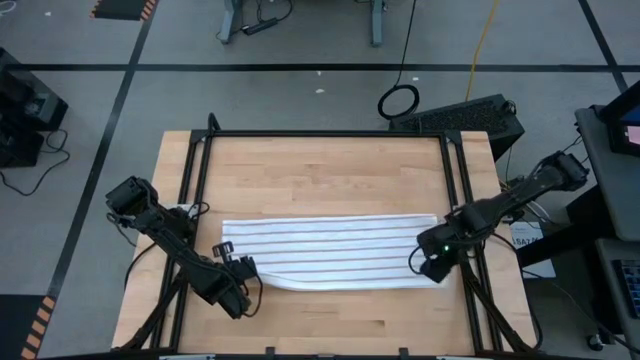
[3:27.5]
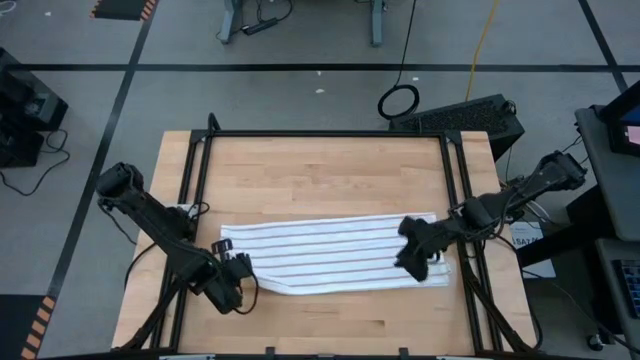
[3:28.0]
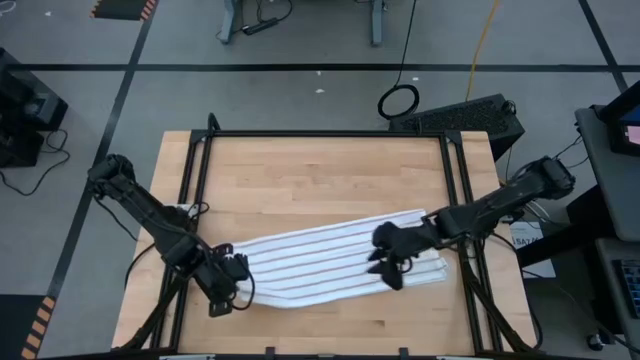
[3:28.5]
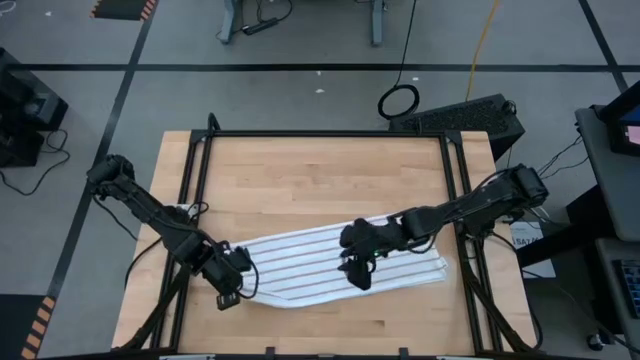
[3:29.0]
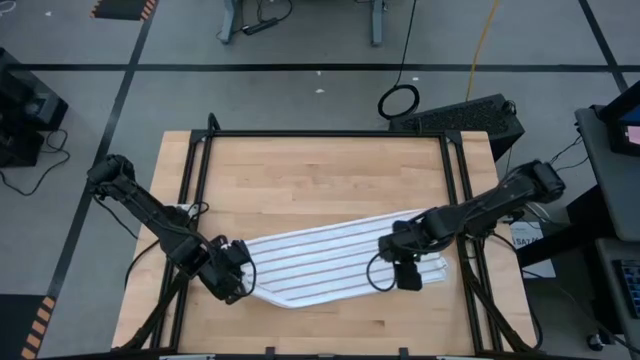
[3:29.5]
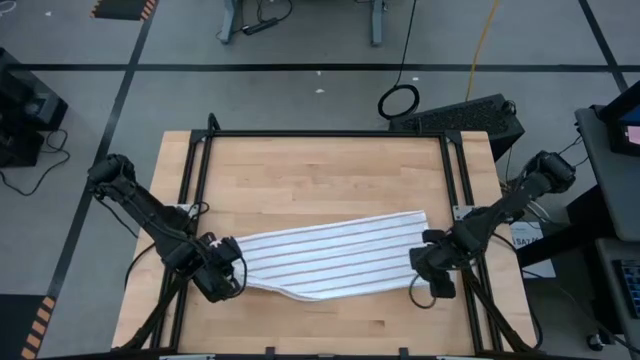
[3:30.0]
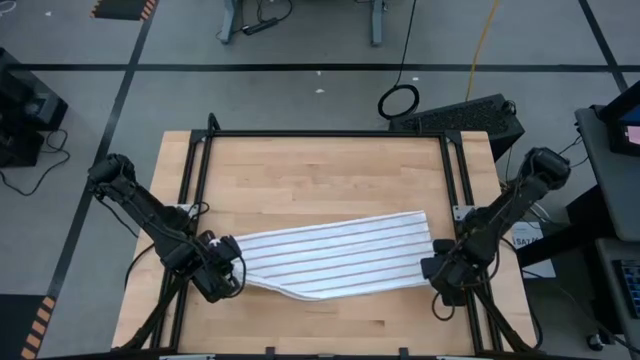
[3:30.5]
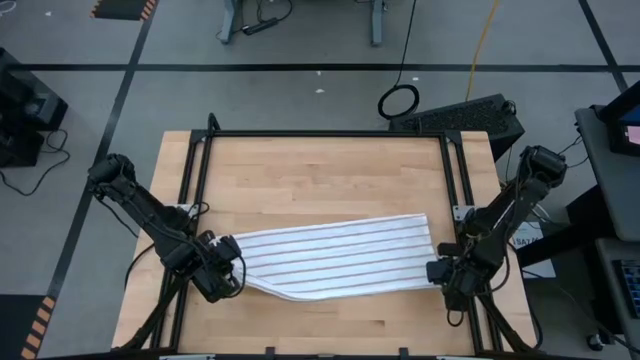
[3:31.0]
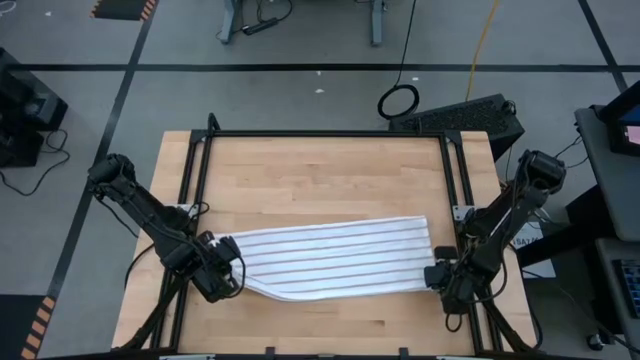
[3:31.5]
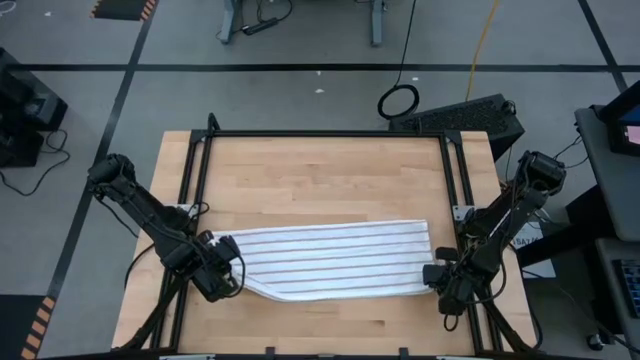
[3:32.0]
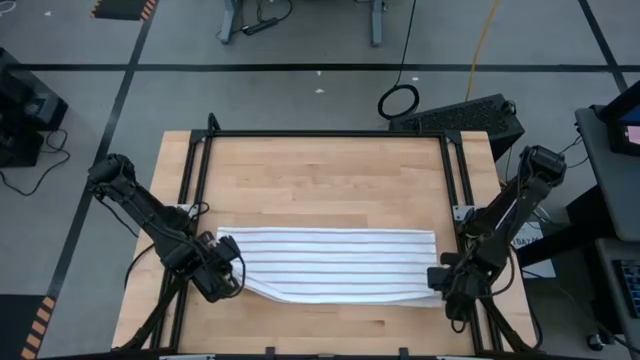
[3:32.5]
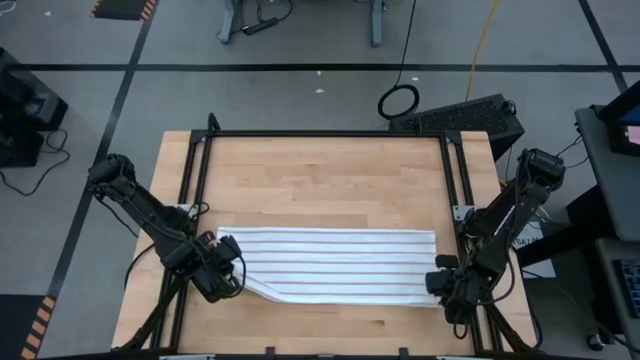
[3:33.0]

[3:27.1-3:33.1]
Task: Roll towel into tight, uniform cylinder
Fold the white brown kitchen towel

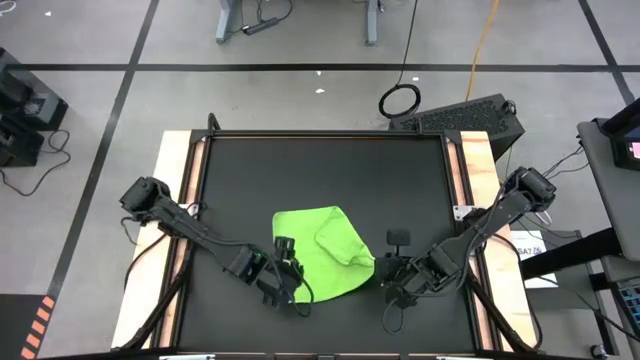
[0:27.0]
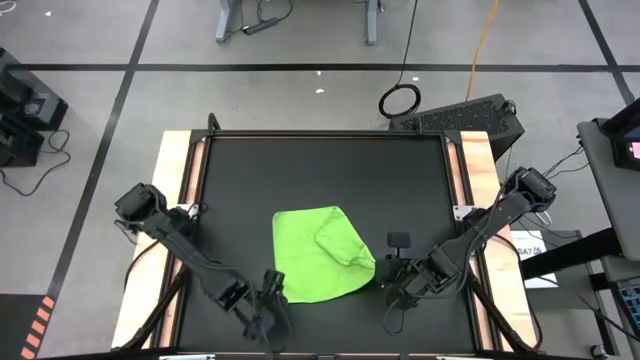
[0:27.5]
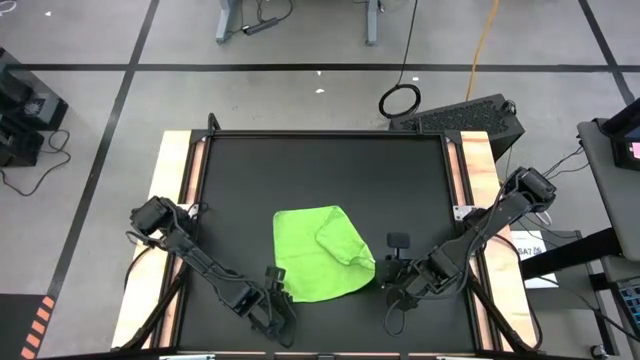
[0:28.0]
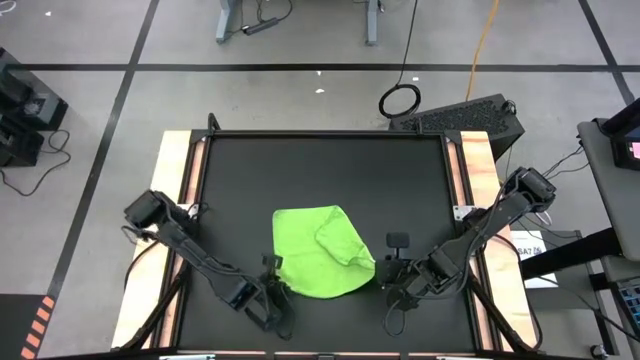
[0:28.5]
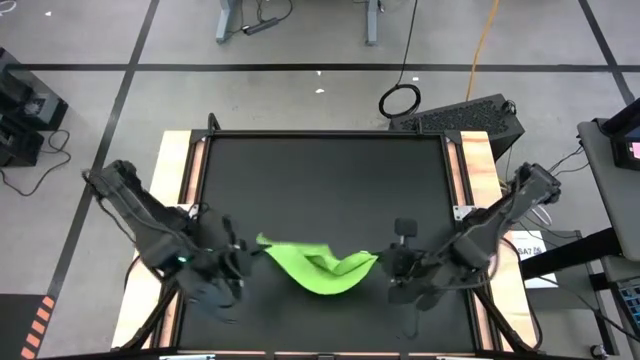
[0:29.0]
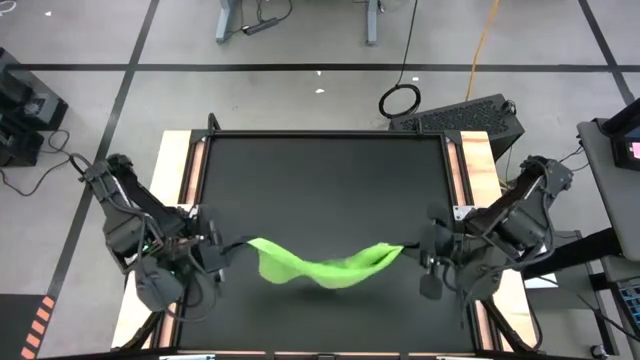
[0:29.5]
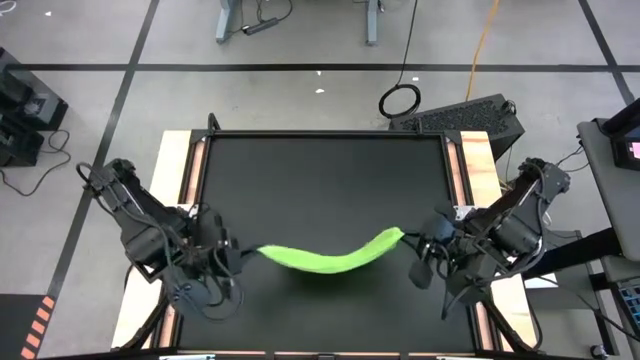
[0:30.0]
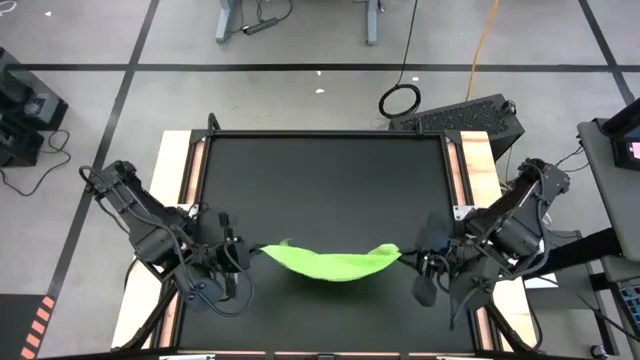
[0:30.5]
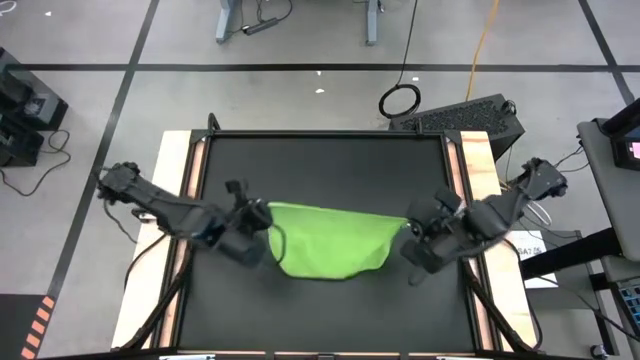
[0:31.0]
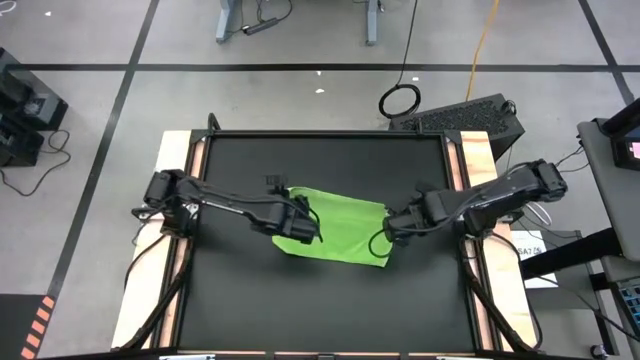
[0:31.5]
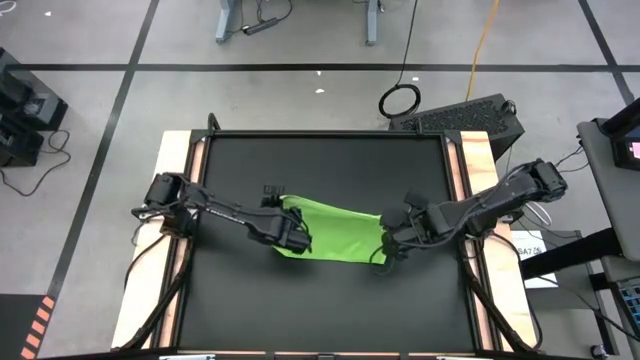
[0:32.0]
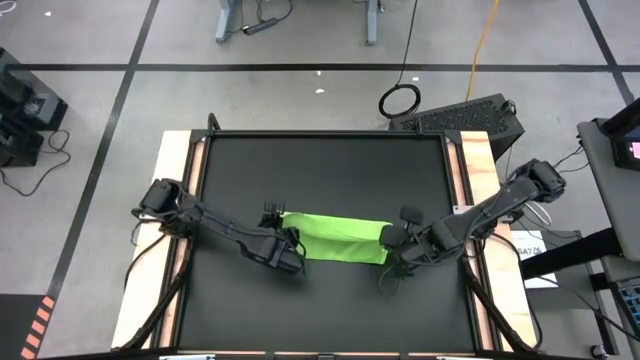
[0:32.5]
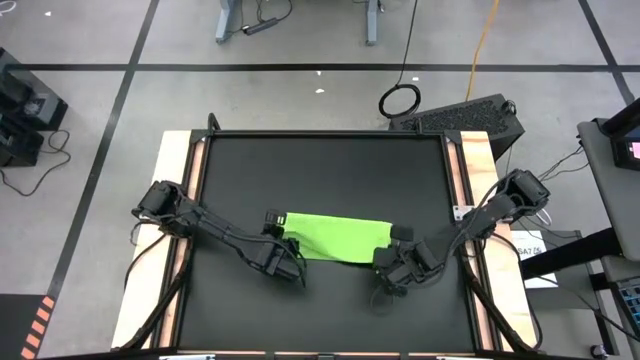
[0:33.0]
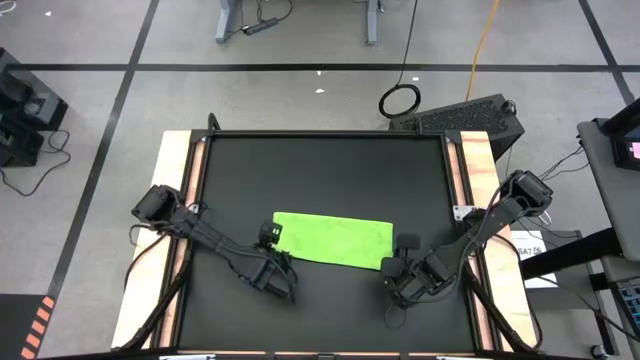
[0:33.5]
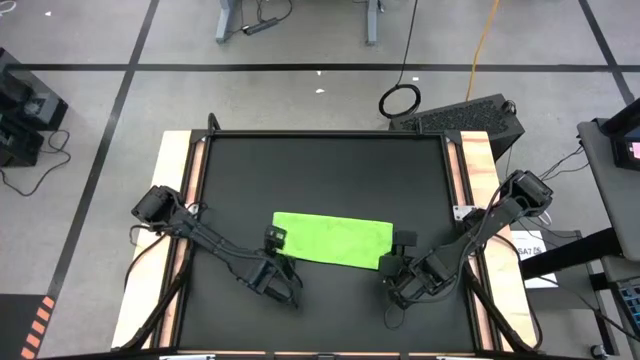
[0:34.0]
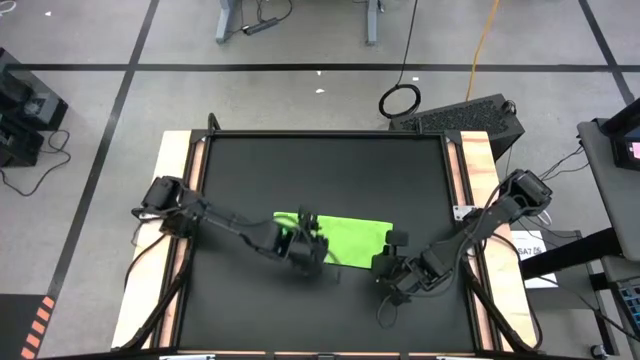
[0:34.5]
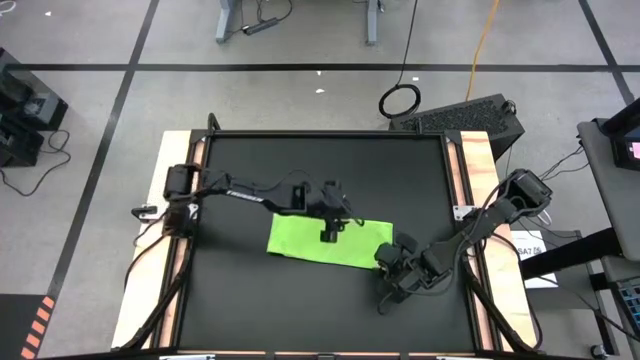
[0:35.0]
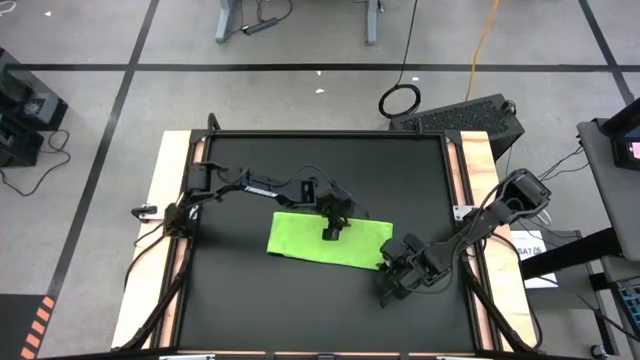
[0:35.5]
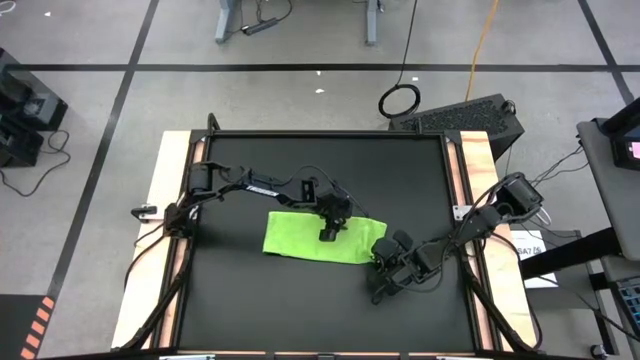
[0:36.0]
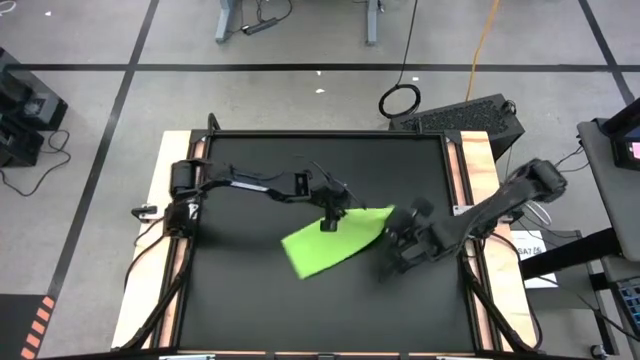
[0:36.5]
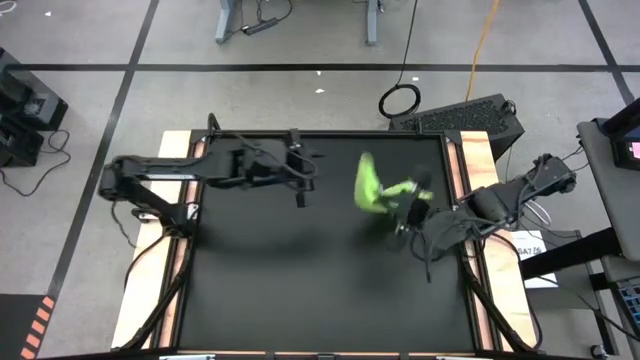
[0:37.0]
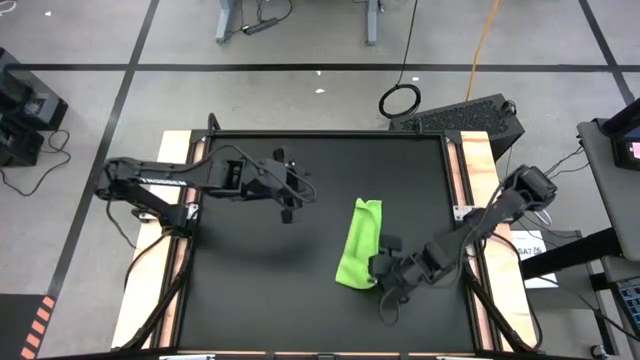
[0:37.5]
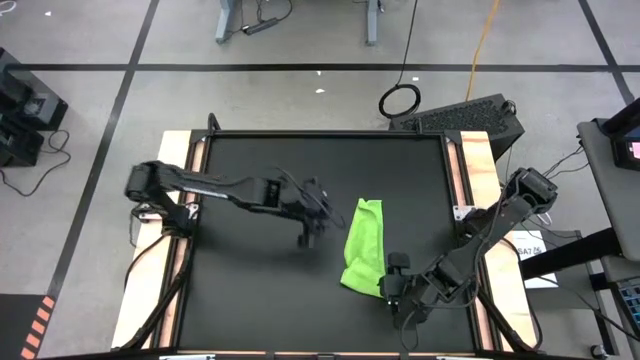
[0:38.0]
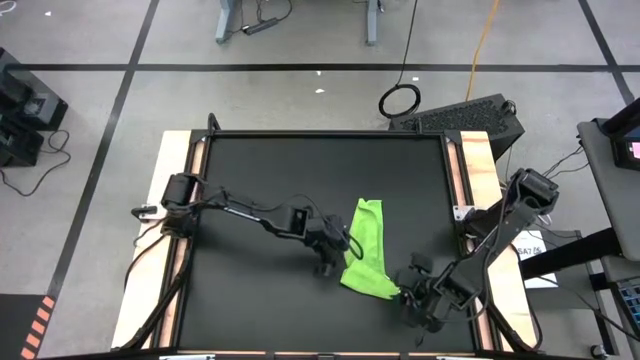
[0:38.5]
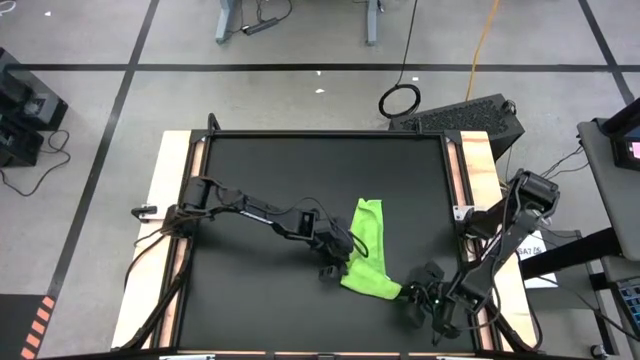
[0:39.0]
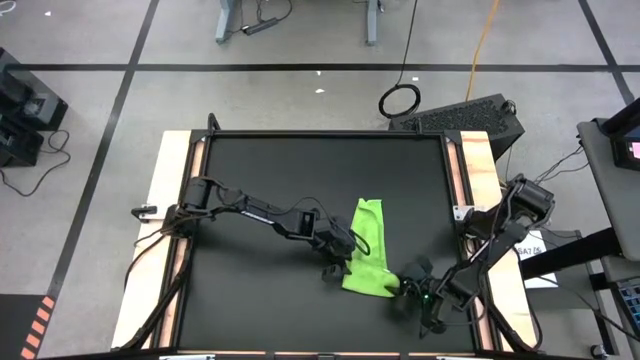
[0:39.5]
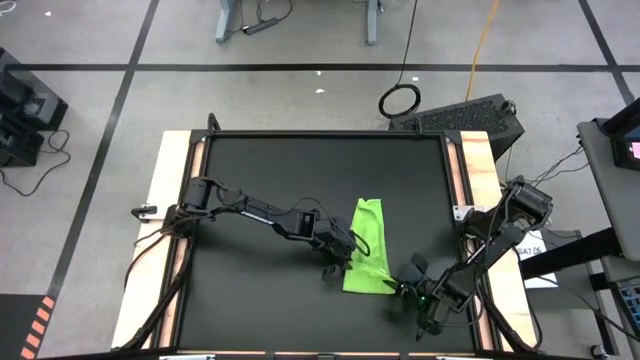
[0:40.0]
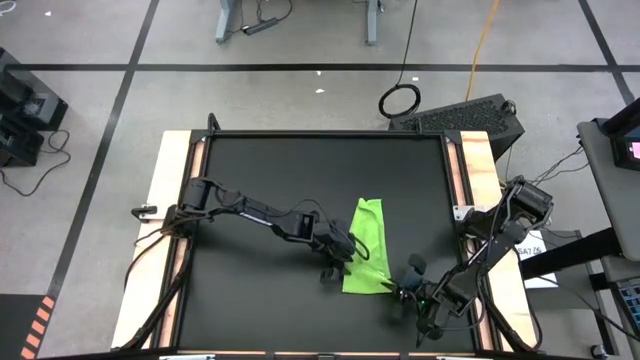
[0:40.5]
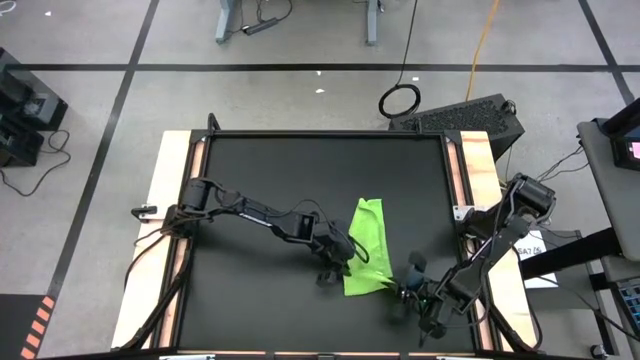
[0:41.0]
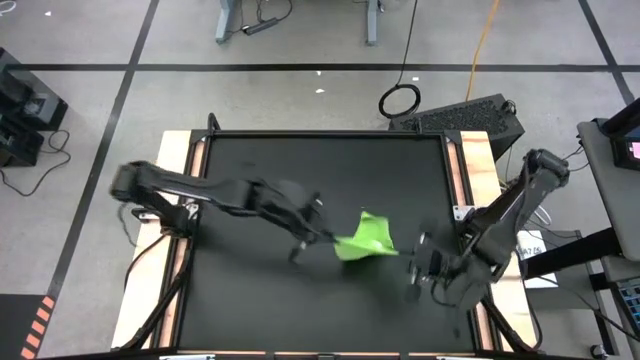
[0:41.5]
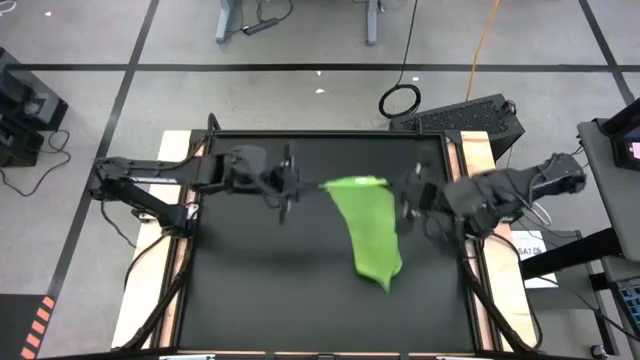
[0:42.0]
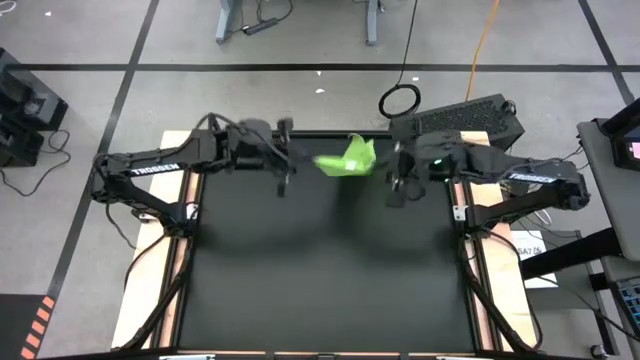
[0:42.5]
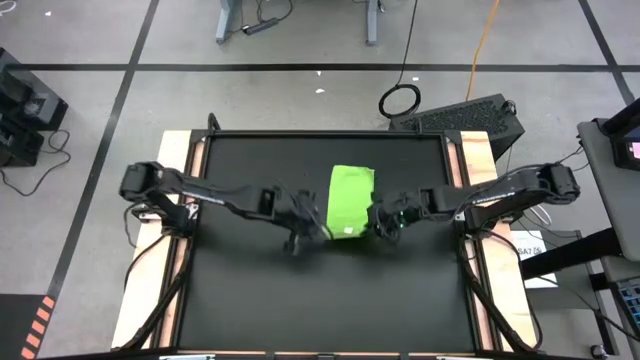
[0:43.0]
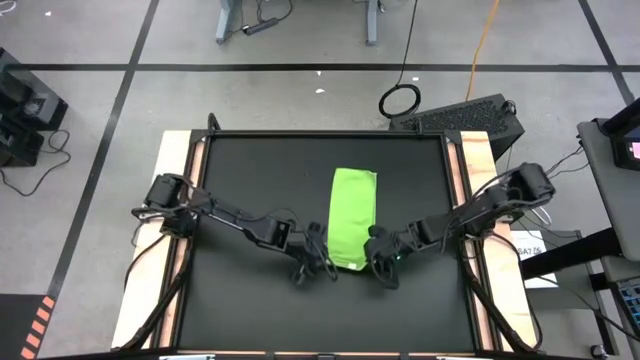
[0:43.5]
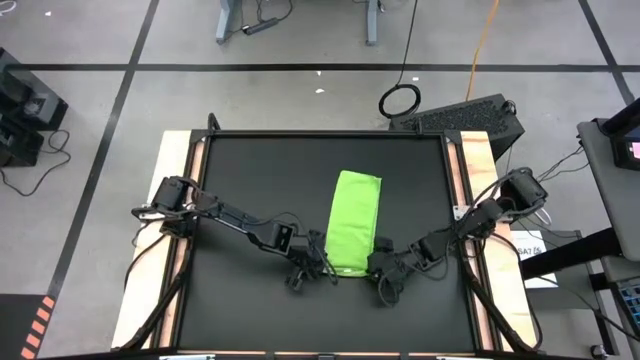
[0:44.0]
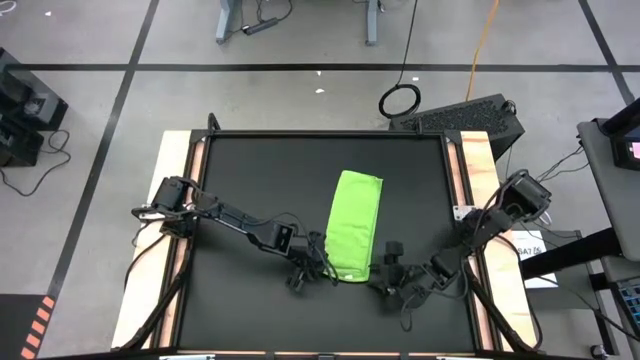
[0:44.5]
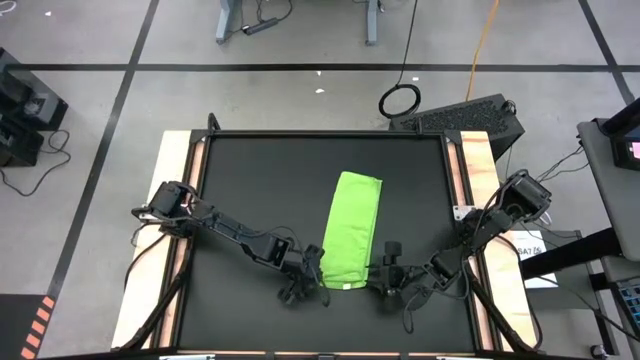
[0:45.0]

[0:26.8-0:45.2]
Task: Roll towel
Fold the green towel on the table
